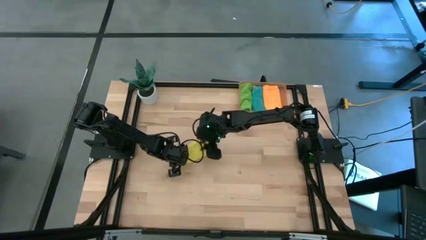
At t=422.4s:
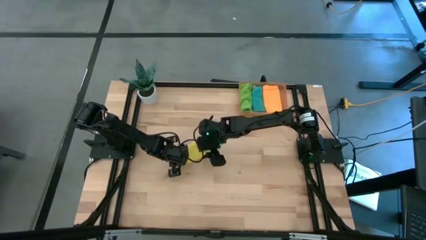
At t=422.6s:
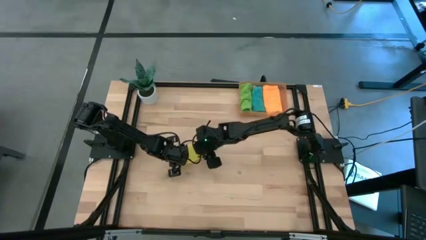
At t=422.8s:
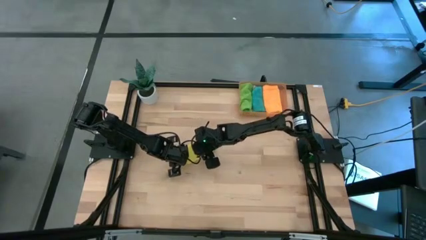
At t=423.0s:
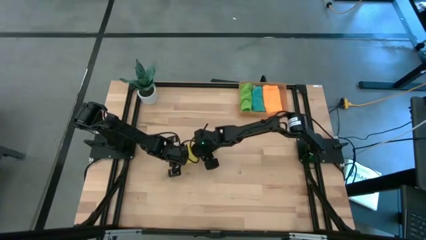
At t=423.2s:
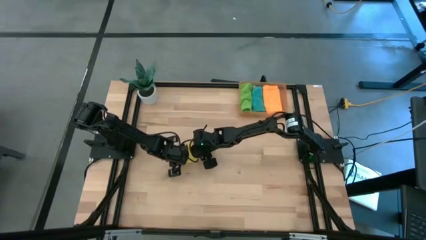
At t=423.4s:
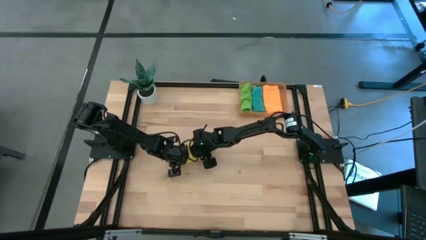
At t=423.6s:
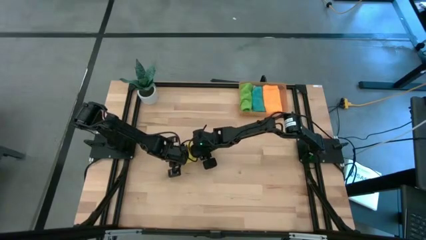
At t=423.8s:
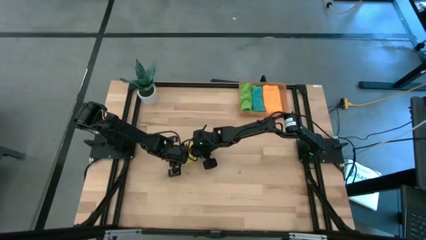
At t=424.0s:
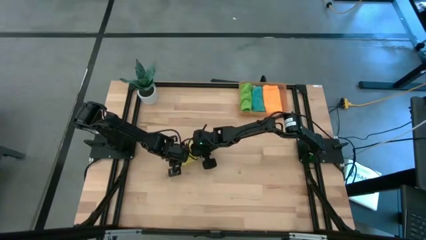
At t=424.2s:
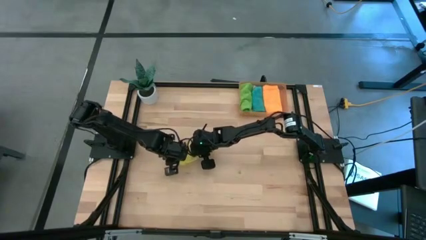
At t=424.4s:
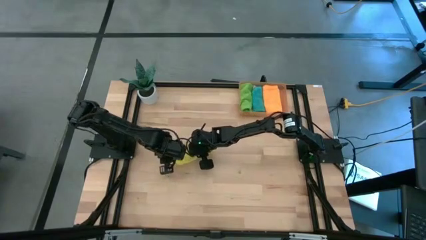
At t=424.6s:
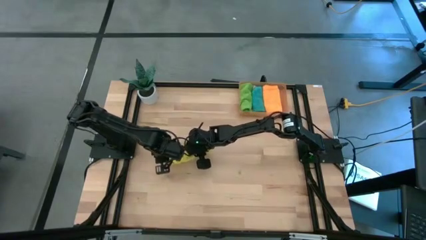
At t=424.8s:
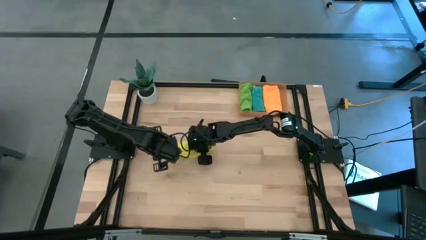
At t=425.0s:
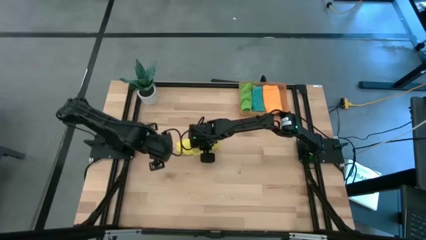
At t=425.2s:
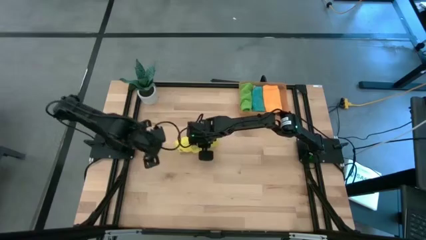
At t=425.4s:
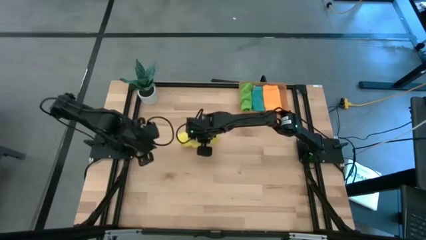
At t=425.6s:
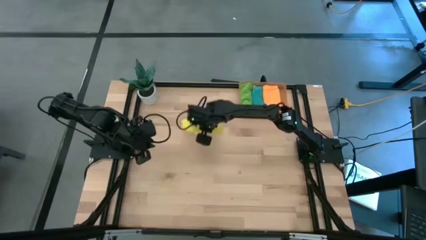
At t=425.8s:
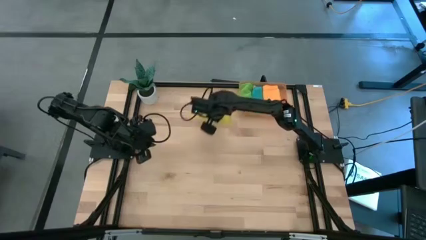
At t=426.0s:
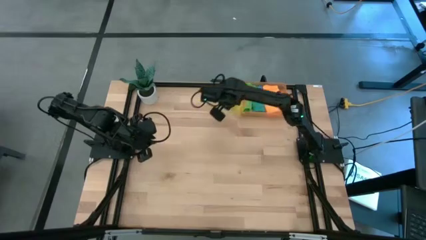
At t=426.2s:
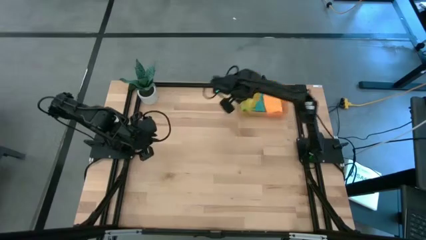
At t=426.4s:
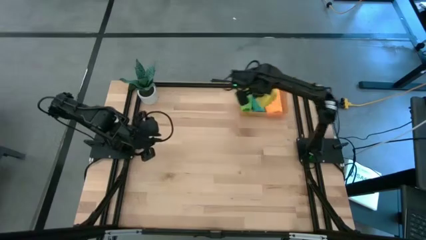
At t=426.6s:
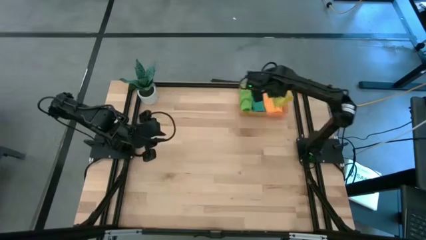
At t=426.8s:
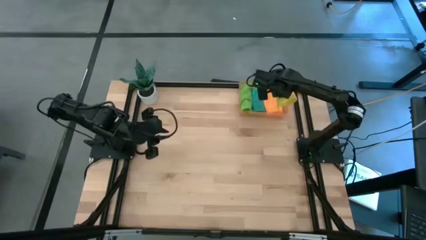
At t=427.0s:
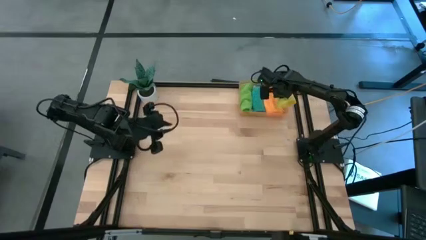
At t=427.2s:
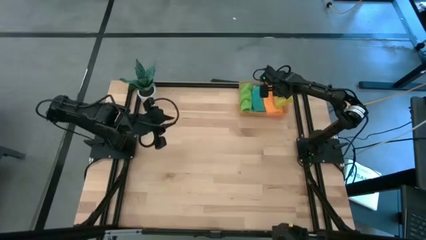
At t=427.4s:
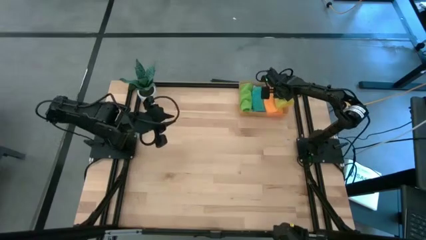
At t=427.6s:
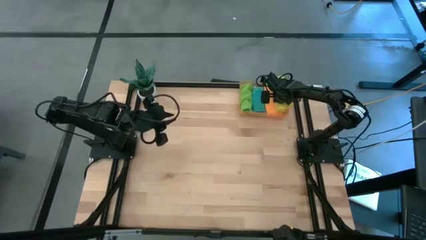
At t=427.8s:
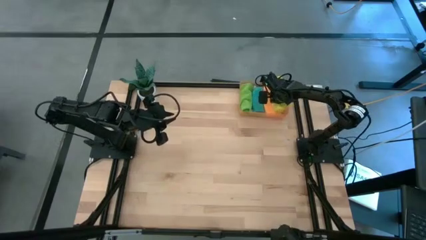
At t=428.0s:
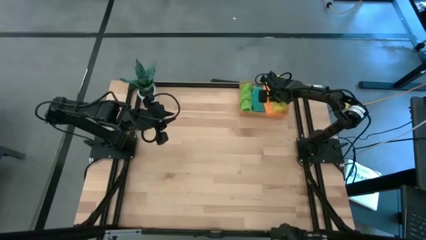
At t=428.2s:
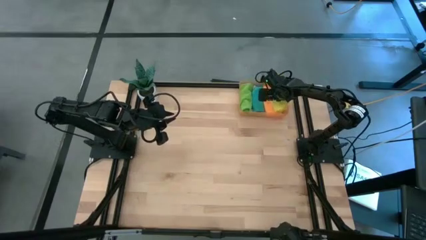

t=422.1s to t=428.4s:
Task: Roll microfiber towels into tight, uniform cylinder then place into a basket
Put the yellow towel into the bin

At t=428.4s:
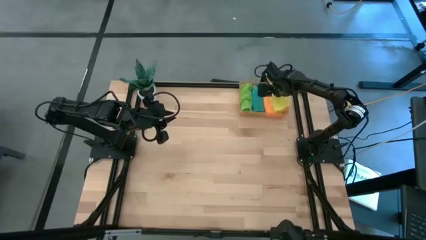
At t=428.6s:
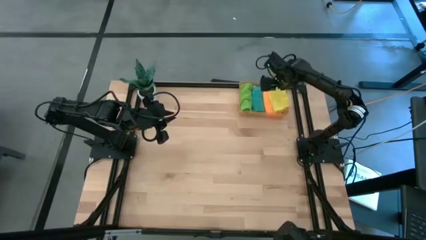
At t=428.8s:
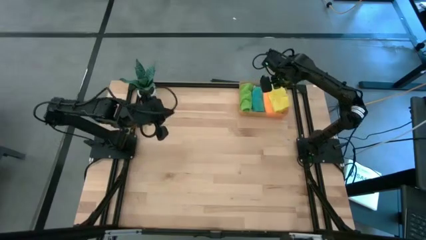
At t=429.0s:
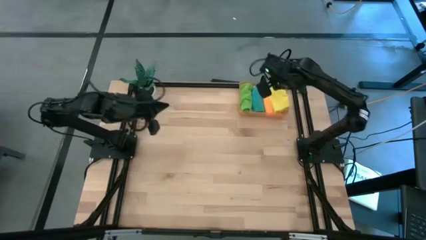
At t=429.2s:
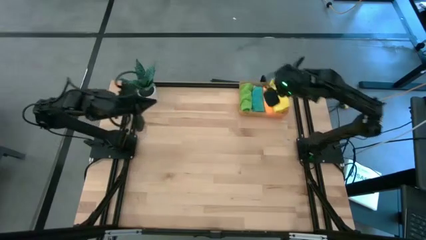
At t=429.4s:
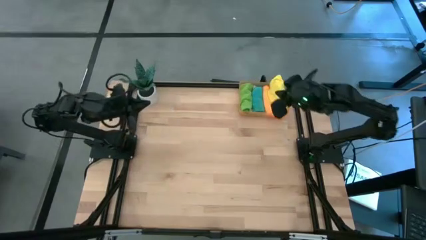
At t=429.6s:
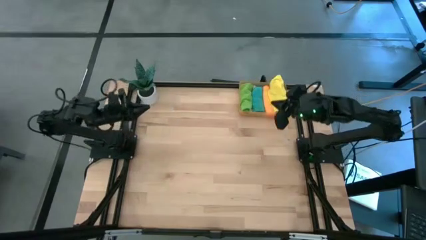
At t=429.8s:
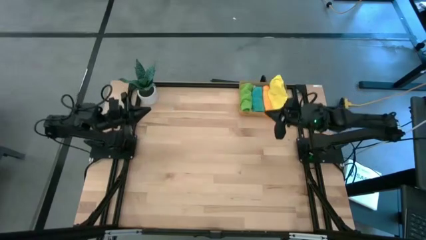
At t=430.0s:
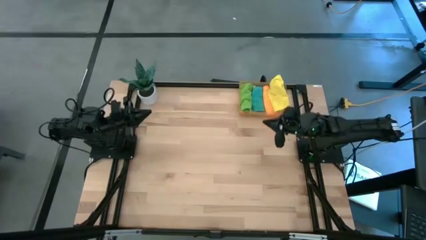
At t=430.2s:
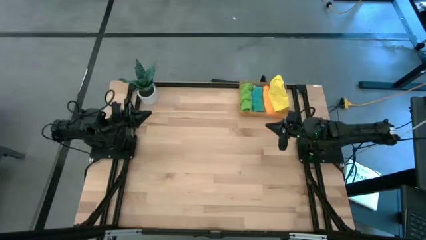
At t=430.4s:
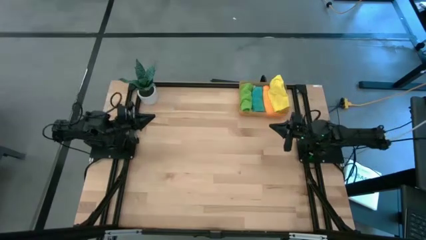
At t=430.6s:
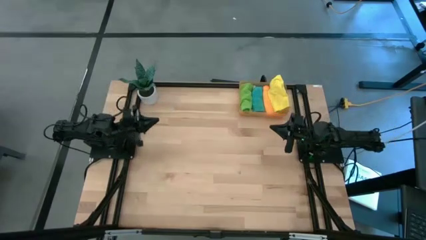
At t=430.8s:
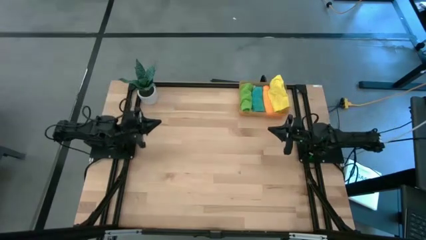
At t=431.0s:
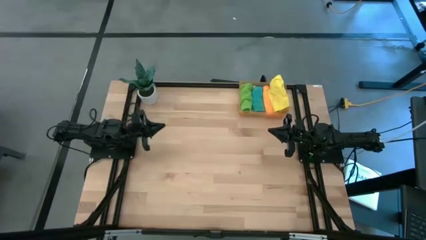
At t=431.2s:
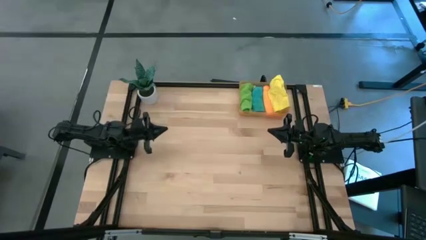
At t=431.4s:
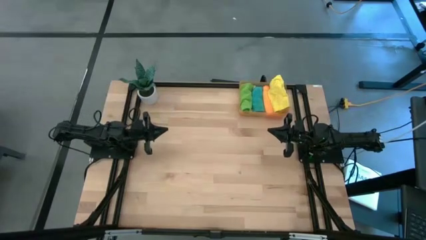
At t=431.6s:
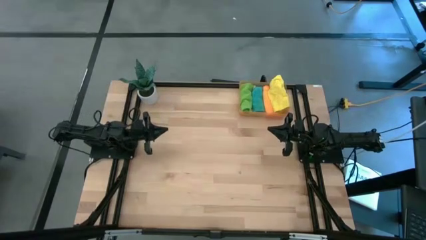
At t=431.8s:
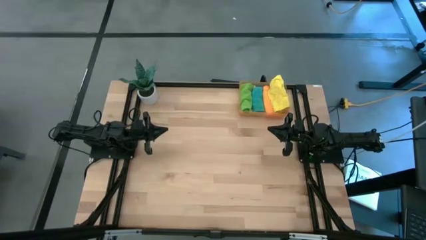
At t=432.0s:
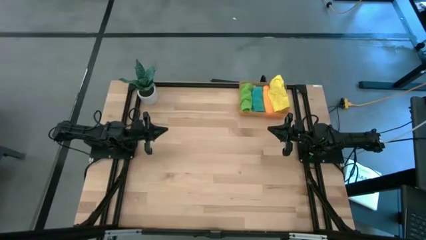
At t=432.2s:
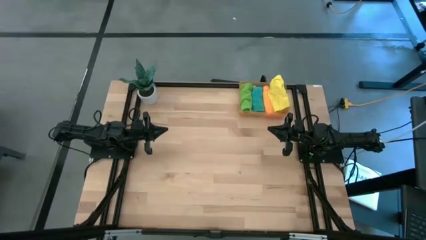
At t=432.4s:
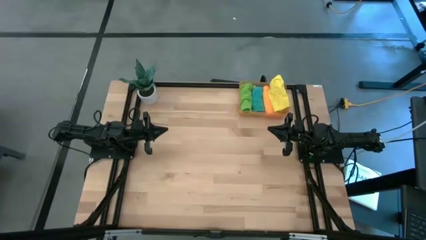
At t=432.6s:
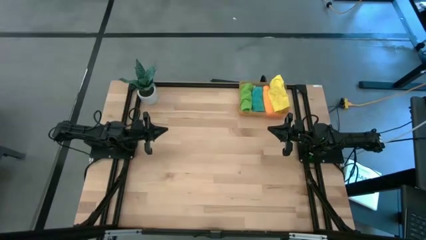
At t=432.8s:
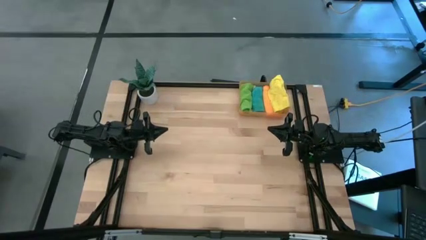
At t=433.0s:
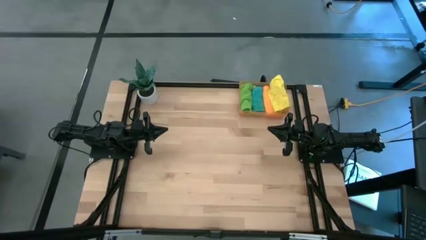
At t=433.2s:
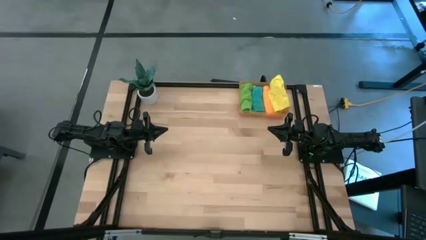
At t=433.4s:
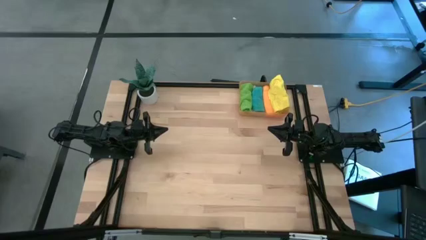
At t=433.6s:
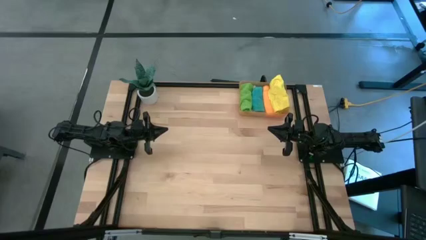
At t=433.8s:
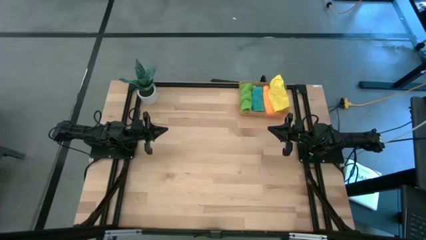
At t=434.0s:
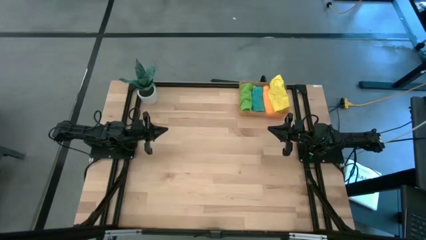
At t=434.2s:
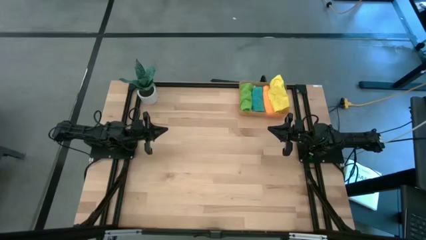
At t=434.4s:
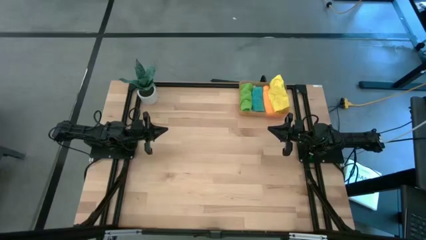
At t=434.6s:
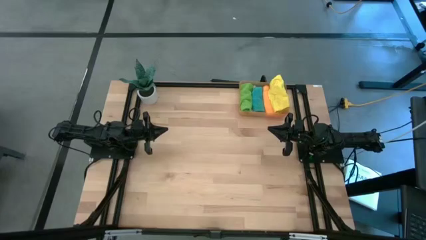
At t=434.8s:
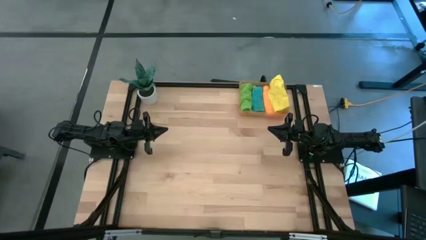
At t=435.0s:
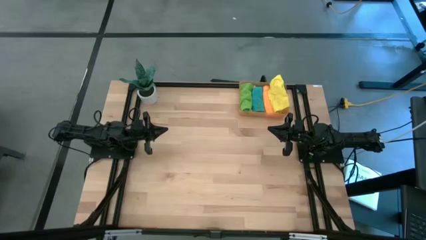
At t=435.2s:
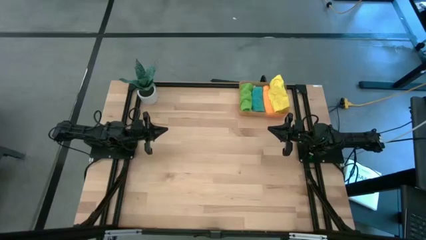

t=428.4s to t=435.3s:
Return to Home Position

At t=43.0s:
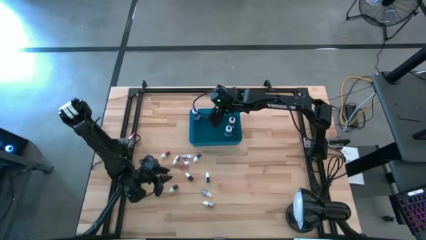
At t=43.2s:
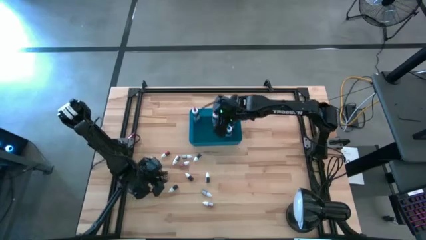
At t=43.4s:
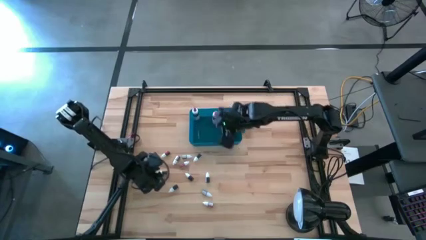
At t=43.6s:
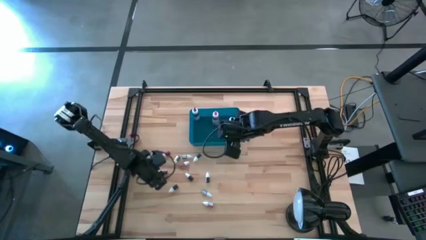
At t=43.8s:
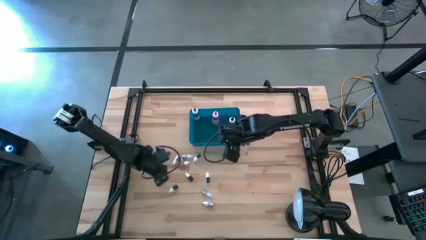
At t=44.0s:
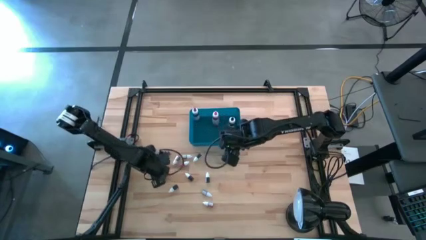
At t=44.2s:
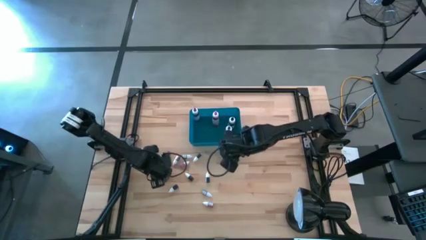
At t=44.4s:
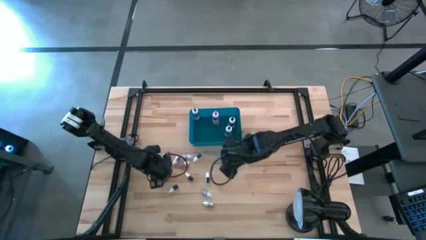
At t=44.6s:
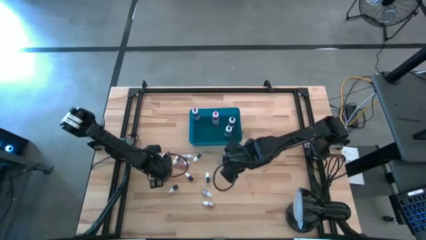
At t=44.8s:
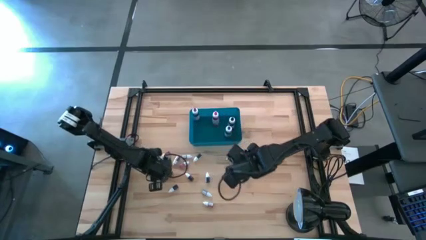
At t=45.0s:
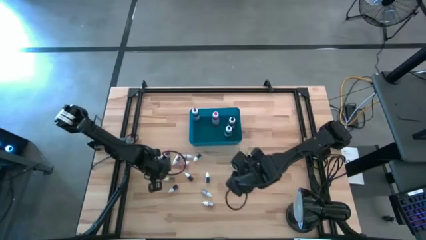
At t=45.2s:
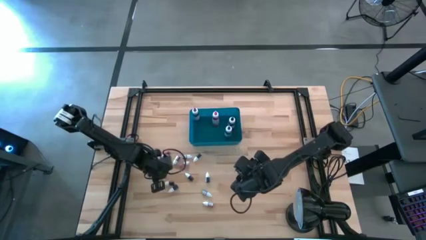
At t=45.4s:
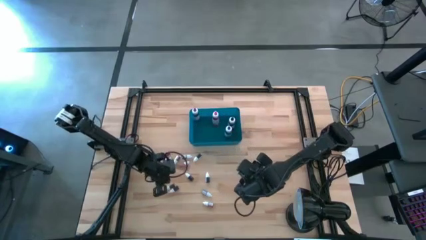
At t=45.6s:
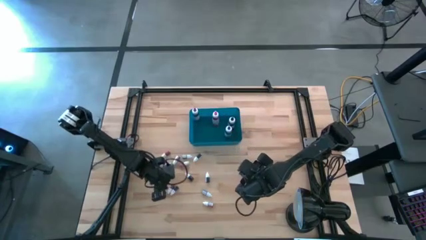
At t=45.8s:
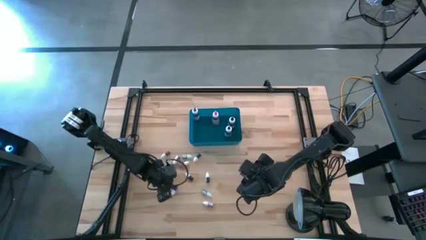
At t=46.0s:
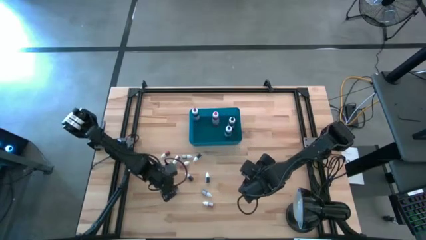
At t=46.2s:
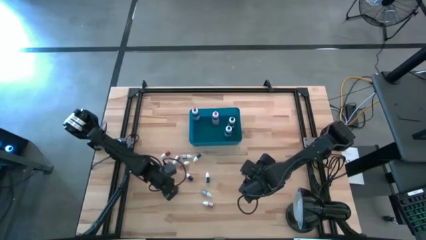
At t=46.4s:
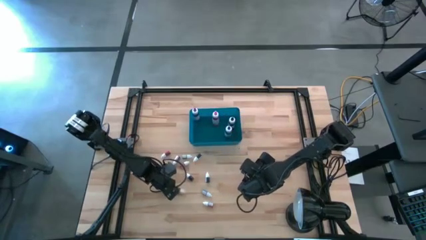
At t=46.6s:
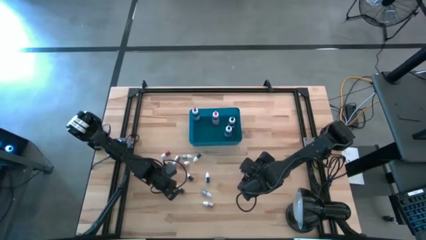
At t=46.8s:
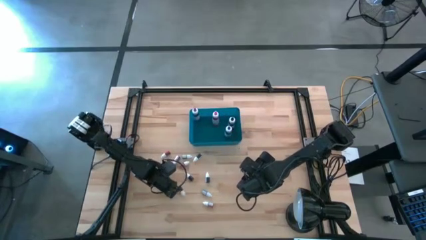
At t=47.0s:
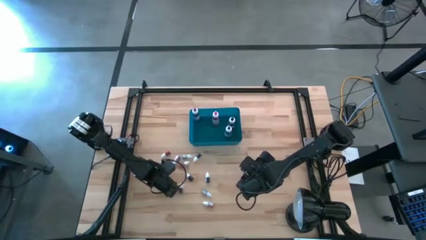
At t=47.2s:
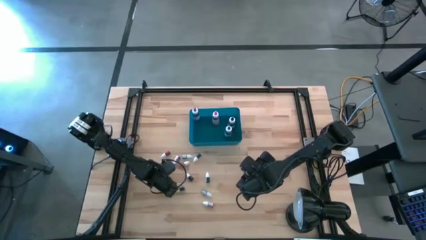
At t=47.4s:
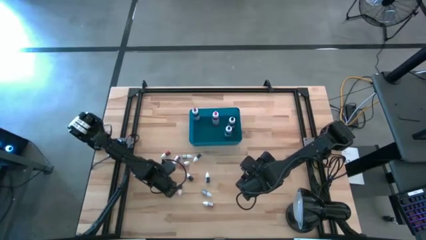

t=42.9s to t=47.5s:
Task: Pick & Place food coloring
Put the small brown food coloring bottle into the bin
